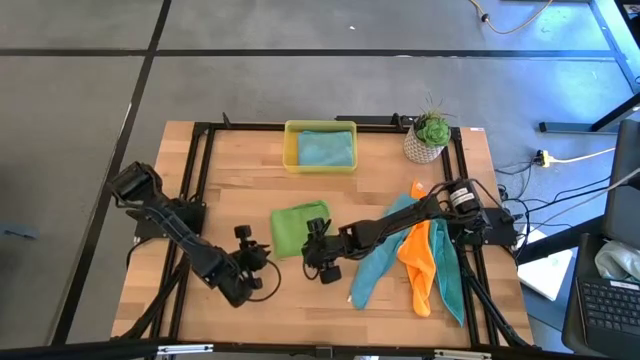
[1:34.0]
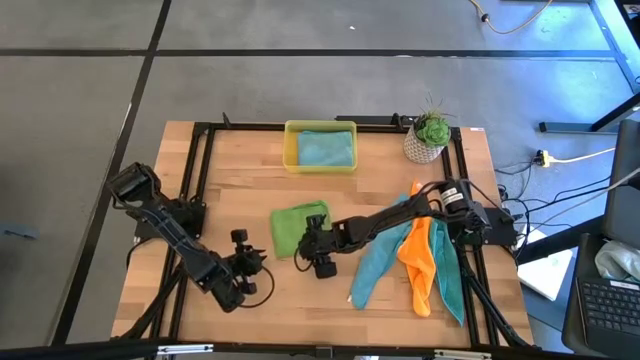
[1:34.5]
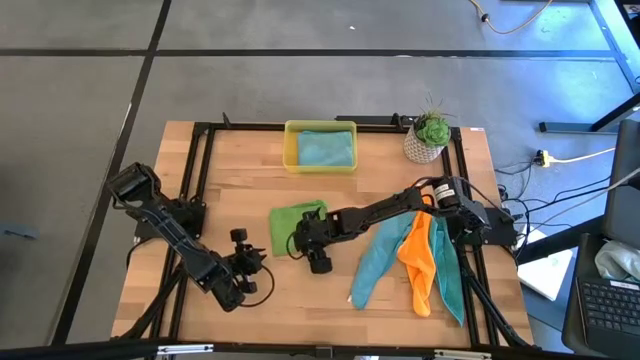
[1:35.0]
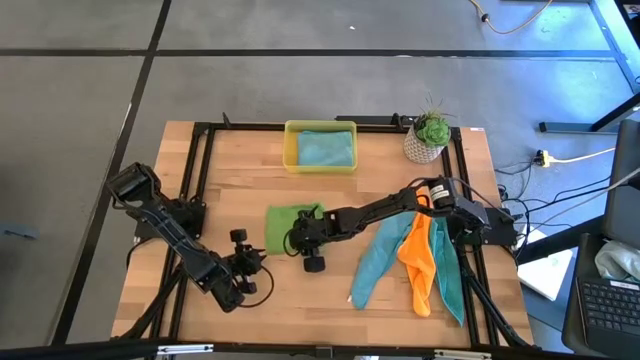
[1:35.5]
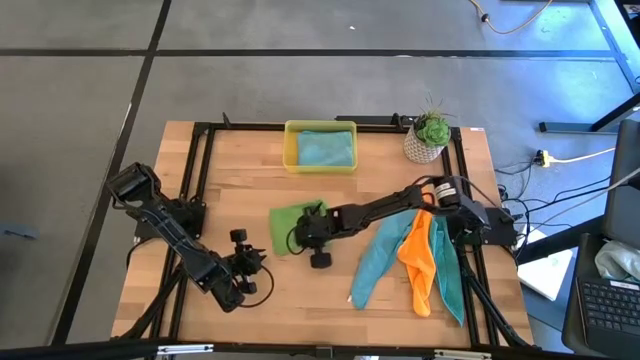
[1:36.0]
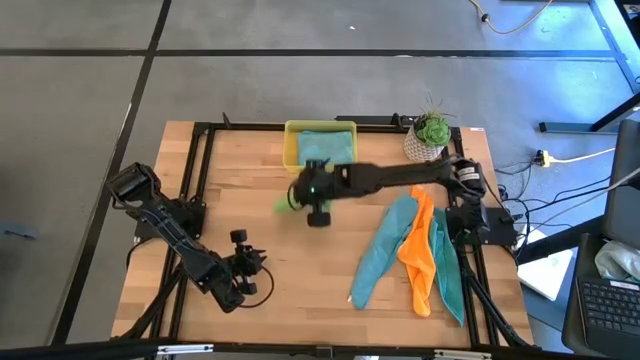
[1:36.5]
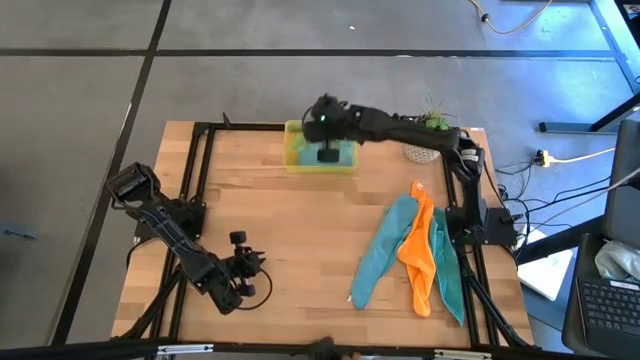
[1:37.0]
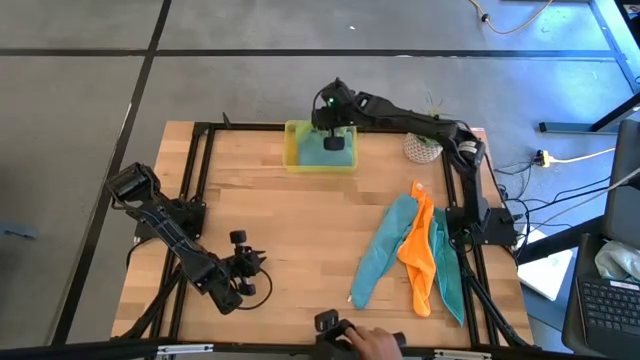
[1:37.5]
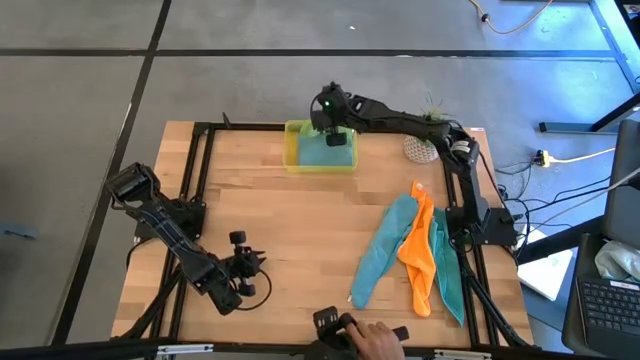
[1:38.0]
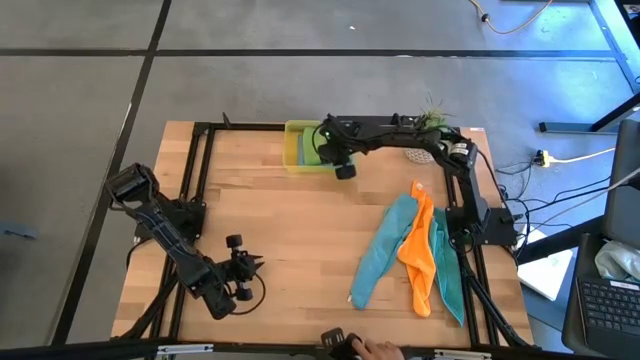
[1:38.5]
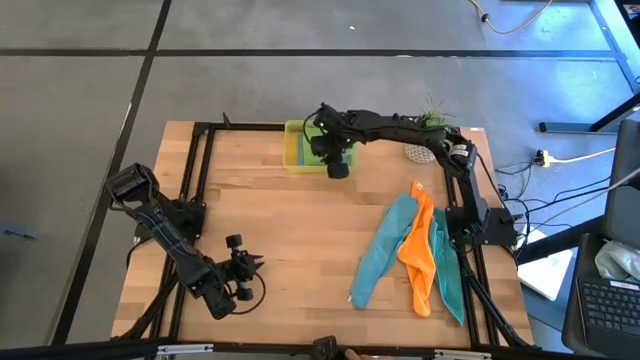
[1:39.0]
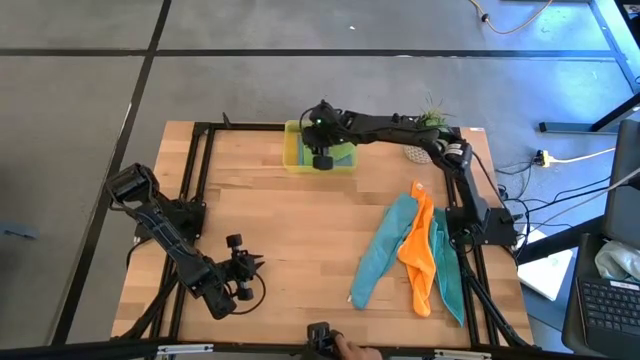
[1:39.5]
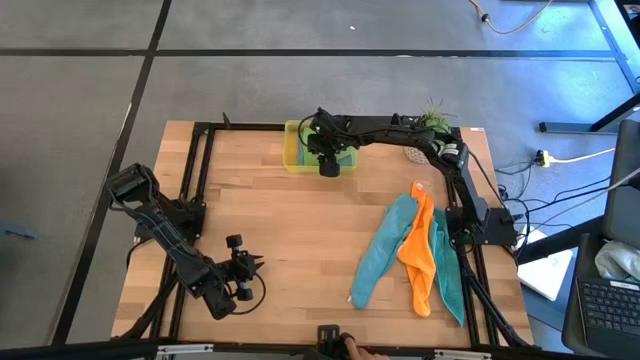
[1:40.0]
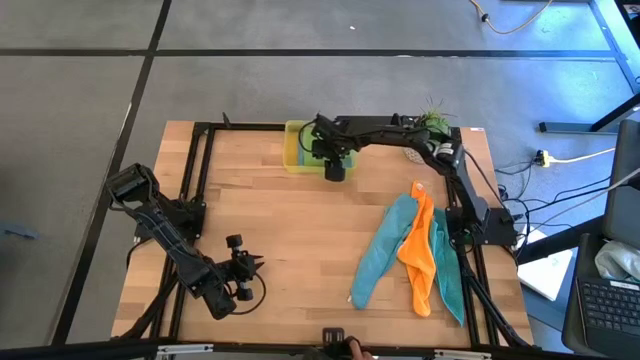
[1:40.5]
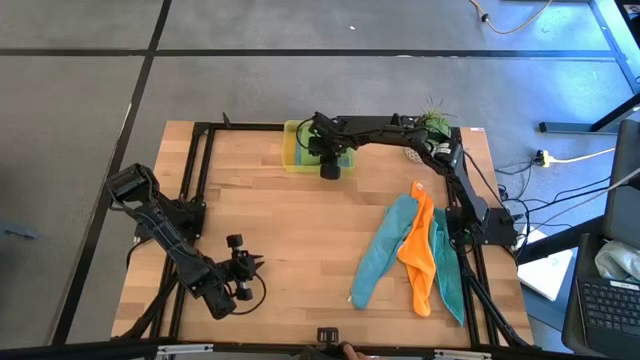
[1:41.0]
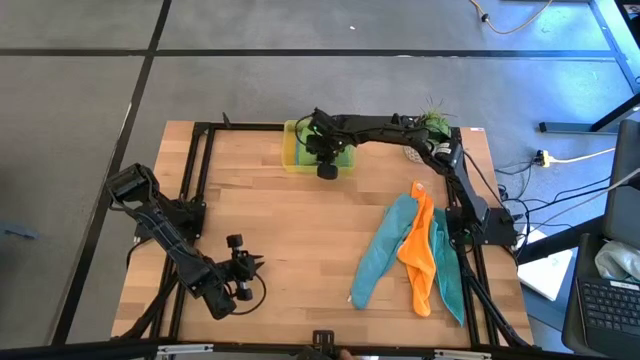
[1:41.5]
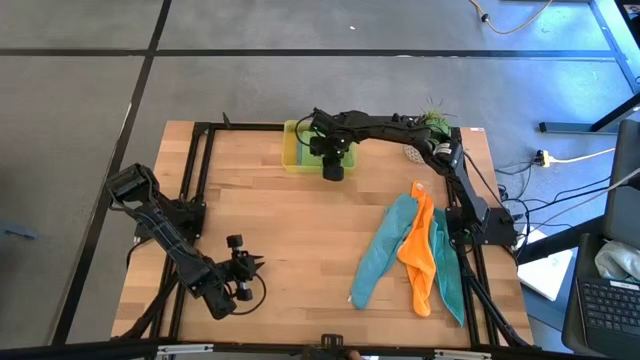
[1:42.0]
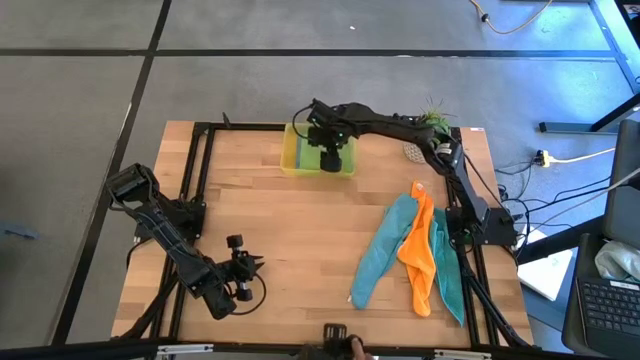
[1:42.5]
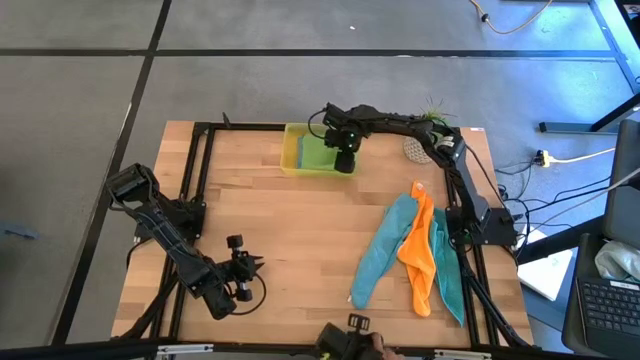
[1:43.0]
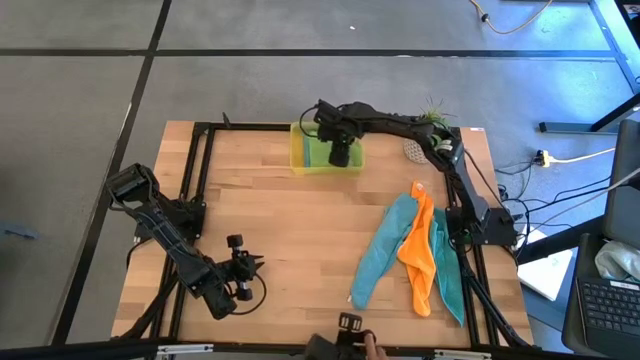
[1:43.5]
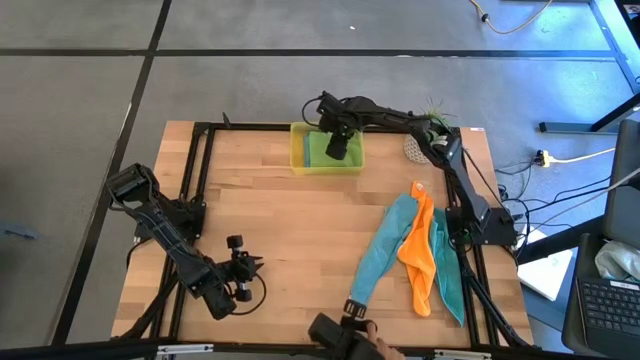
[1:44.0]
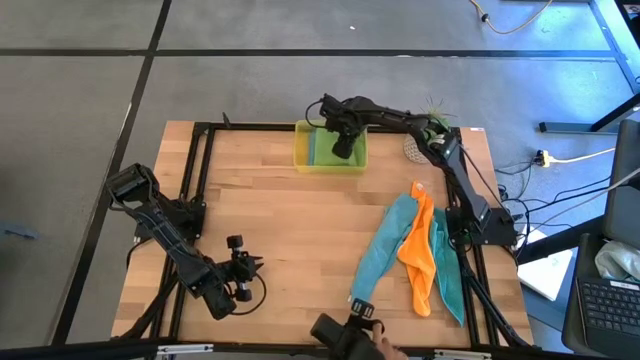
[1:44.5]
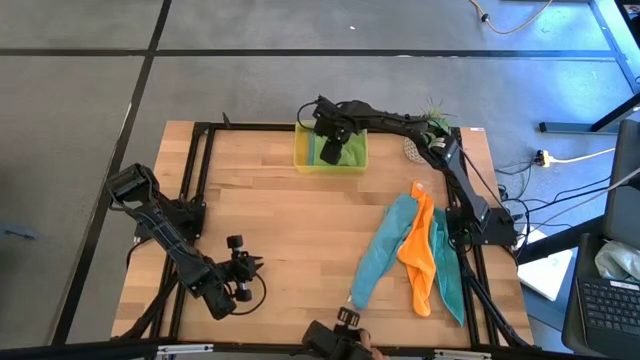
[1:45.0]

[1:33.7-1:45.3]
Task: Fold microfiber towels
Put the green folded cloth into the yellow bin

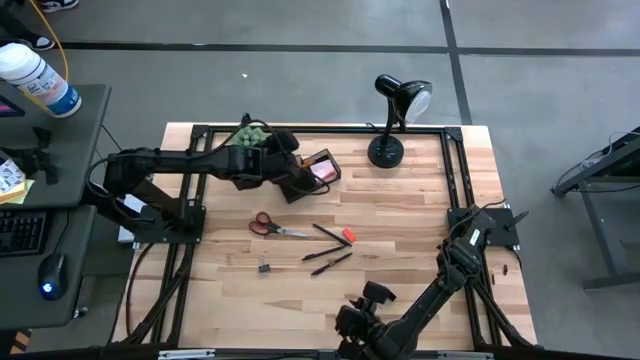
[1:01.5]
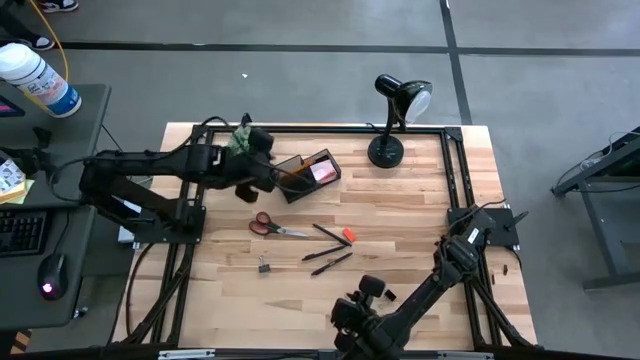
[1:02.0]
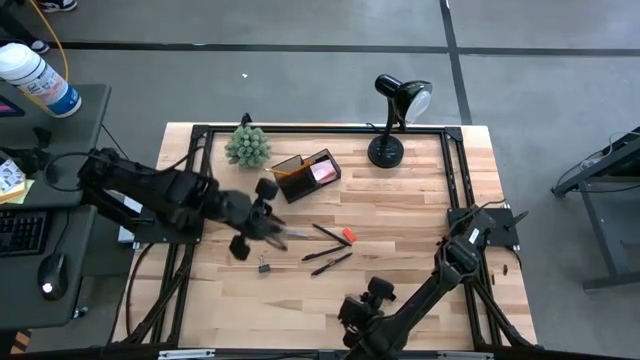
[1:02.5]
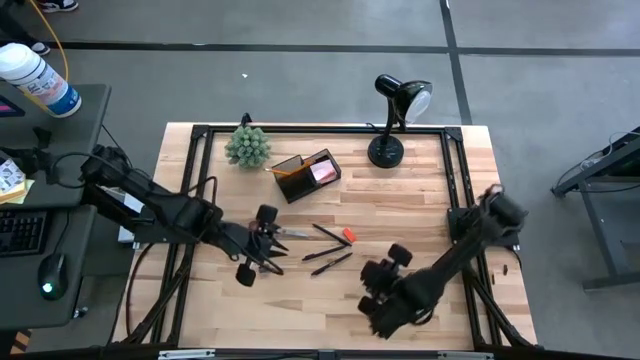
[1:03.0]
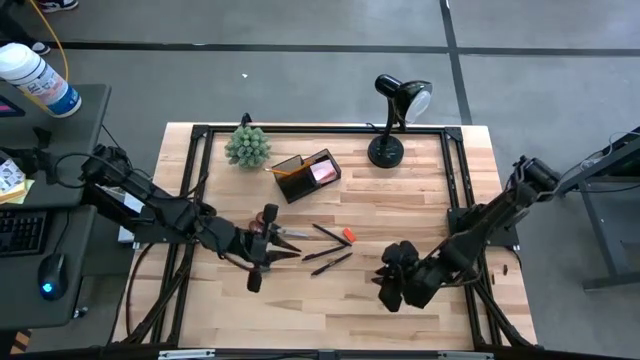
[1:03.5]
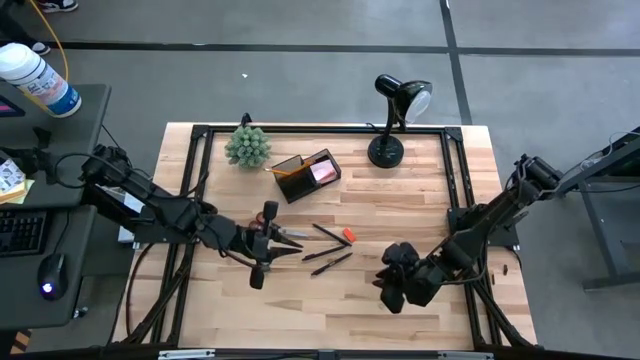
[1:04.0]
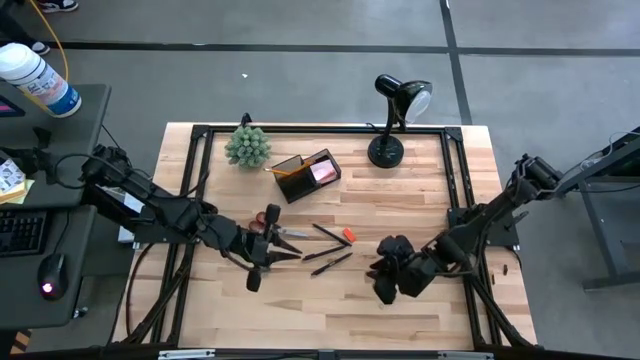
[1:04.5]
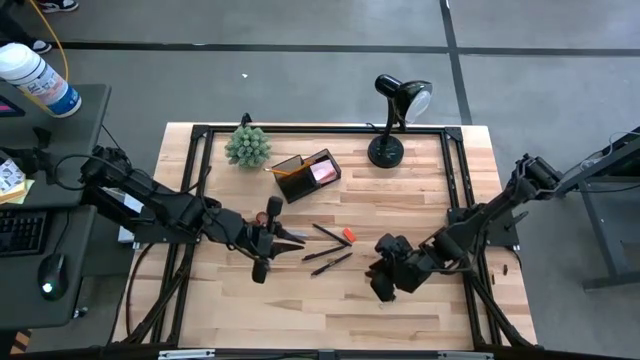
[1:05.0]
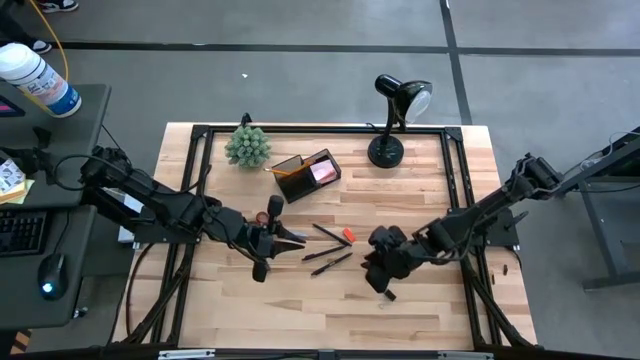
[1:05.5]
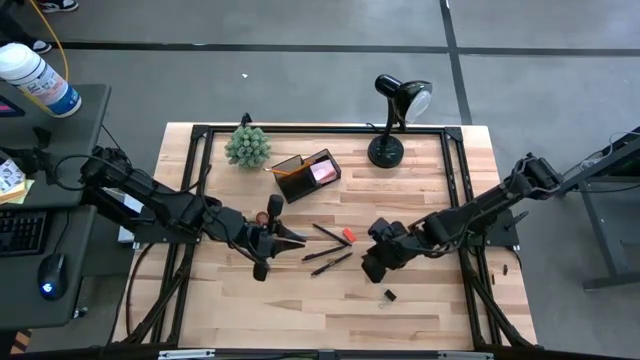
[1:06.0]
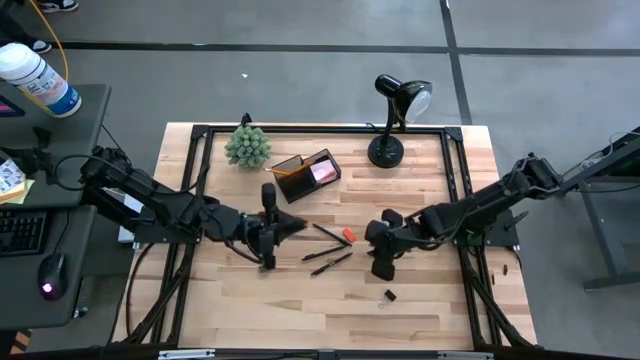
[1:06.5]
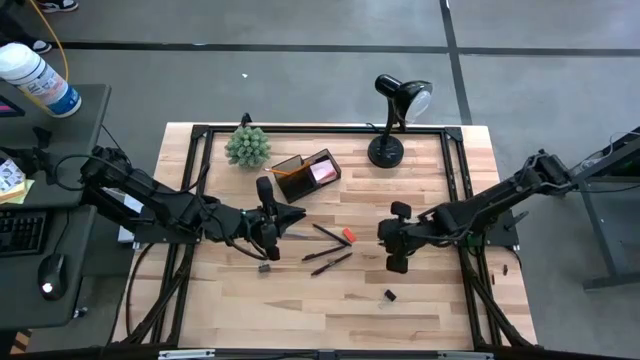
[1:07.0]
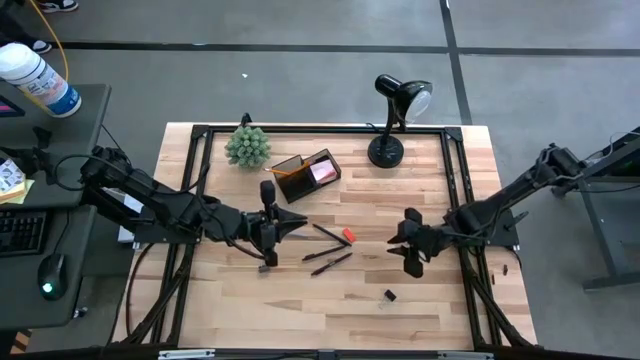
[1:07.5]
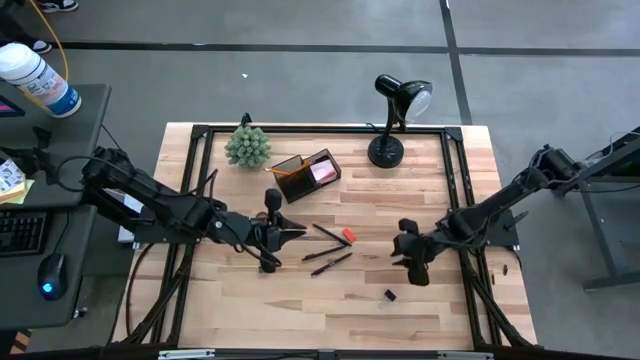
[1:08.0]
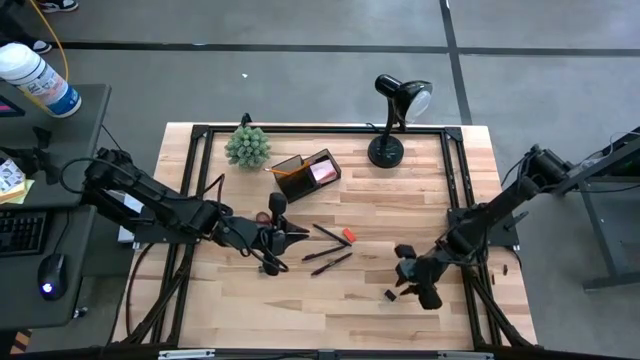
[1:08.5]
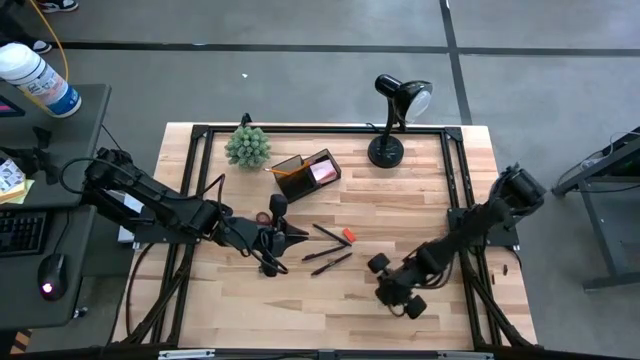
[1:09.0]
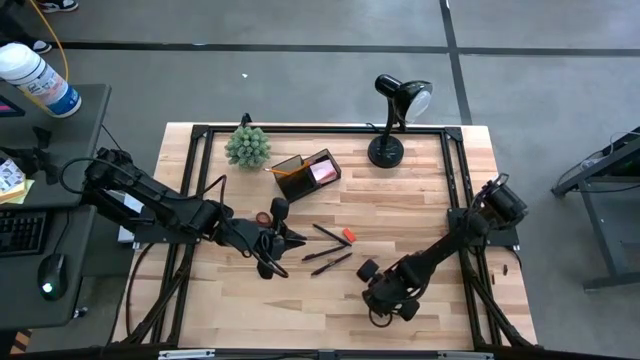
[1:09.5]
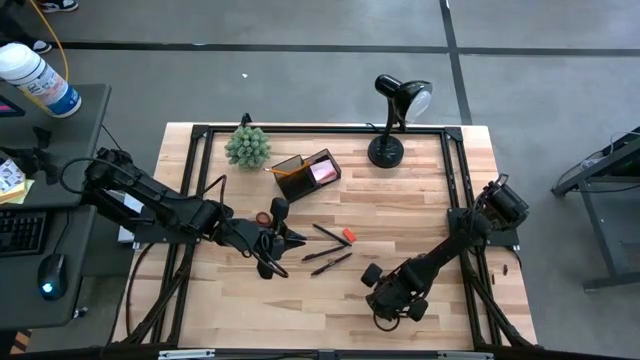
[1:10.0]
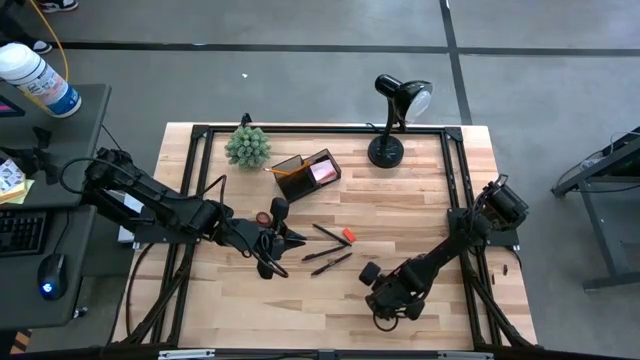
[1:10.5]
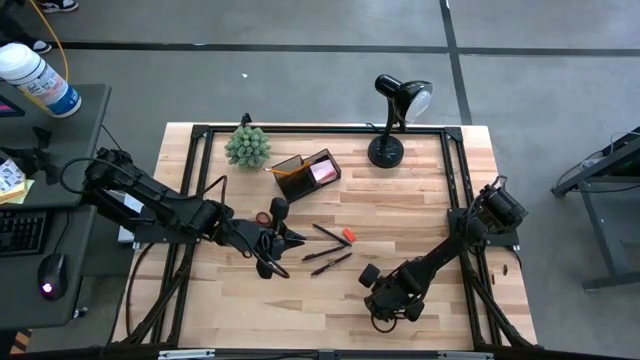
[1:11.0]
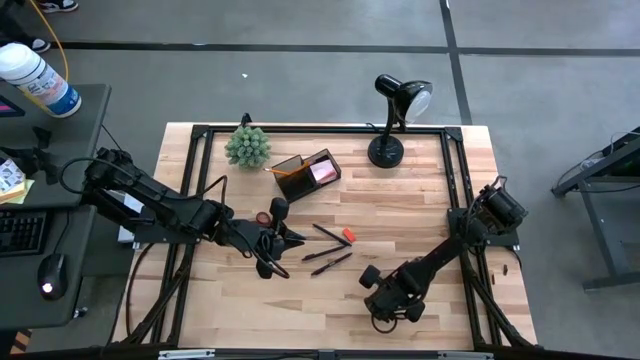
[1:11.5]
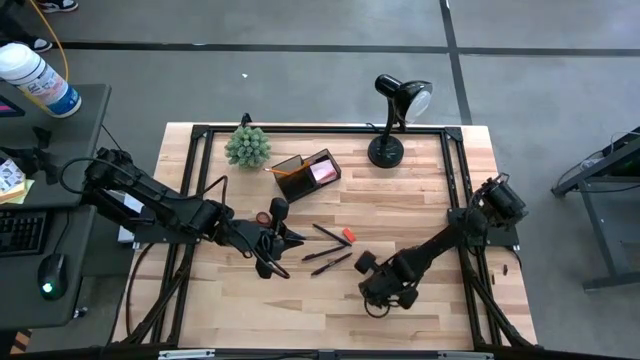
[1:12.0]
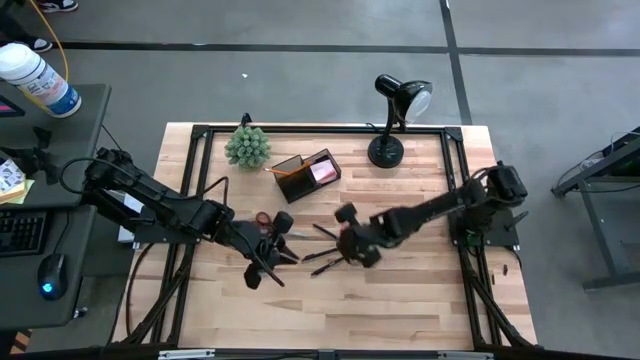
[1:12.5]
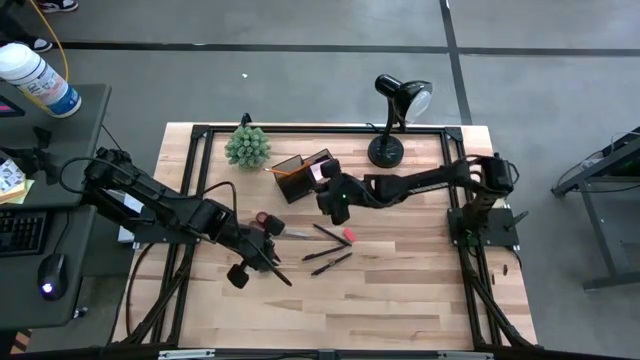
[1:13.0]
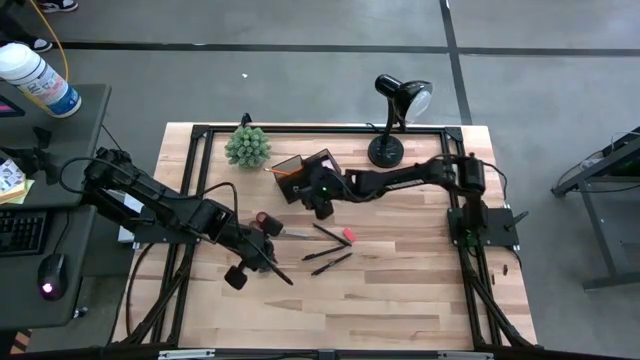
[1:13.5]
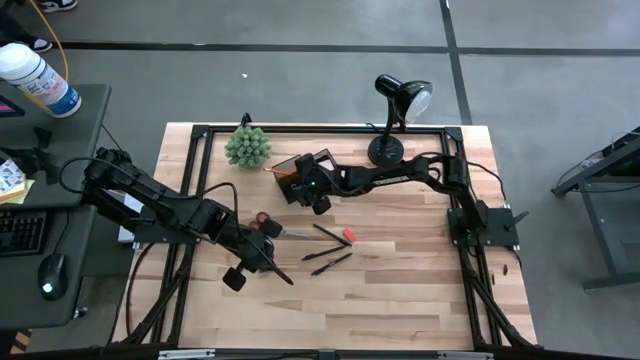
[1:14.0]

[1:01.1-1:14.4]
Task: Pick and place office supplies into organizer
Put the bottom black binder clip into the black desk organizer
